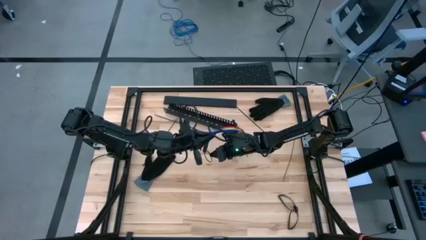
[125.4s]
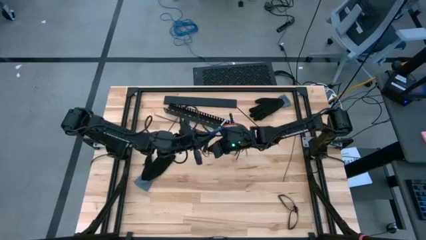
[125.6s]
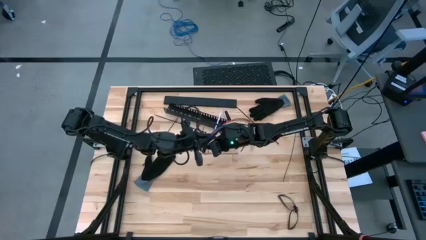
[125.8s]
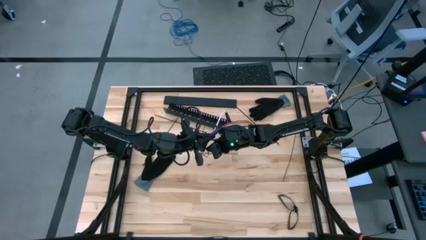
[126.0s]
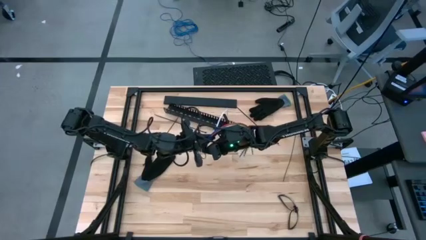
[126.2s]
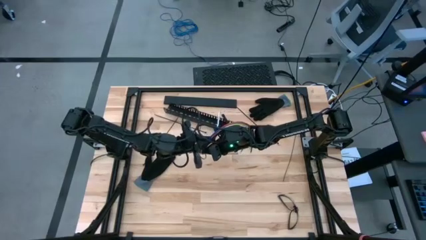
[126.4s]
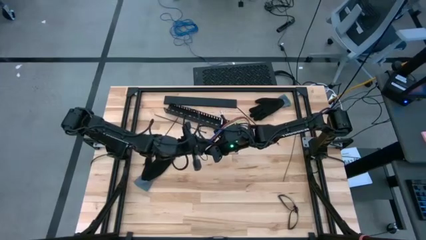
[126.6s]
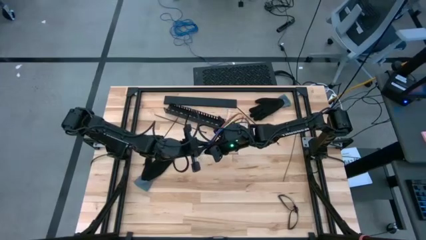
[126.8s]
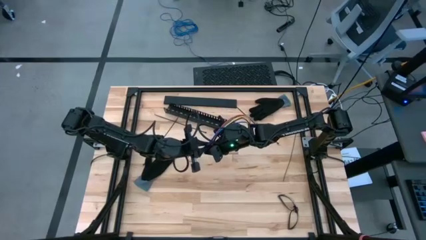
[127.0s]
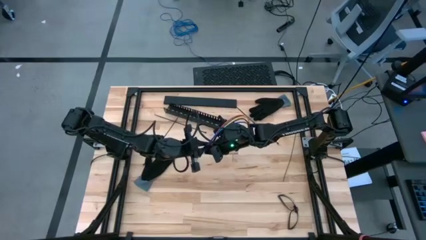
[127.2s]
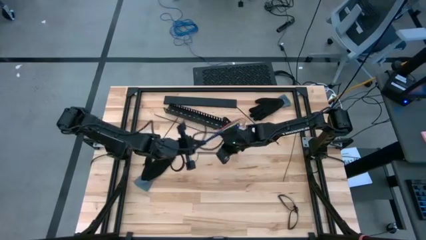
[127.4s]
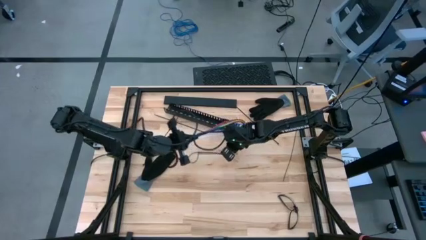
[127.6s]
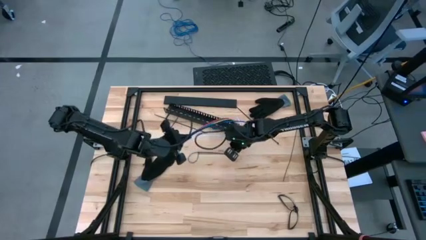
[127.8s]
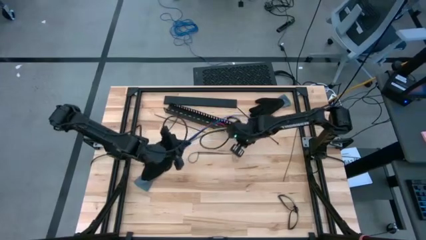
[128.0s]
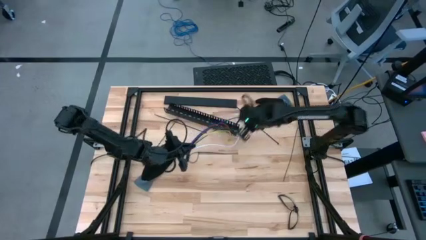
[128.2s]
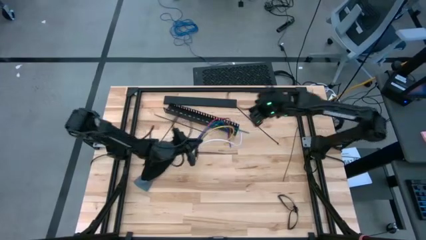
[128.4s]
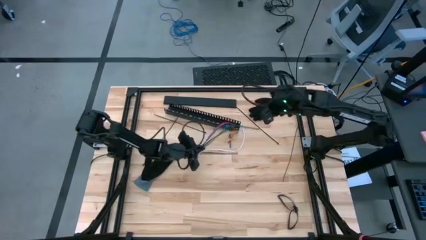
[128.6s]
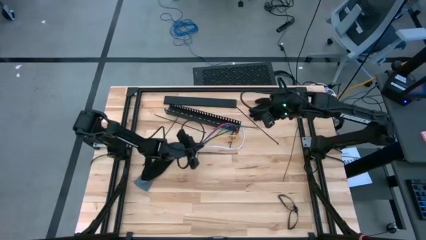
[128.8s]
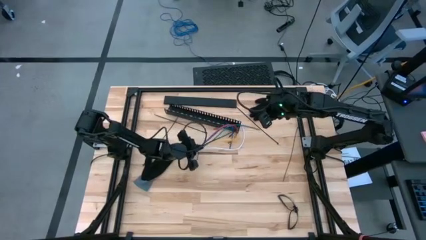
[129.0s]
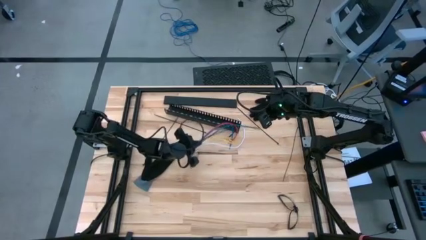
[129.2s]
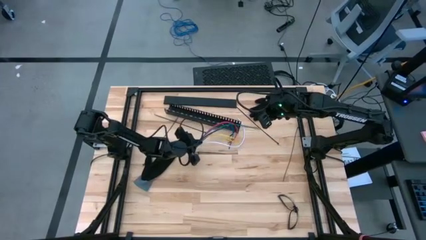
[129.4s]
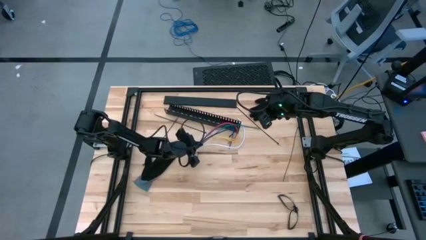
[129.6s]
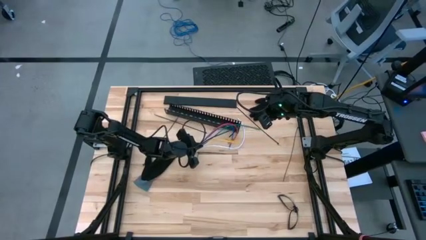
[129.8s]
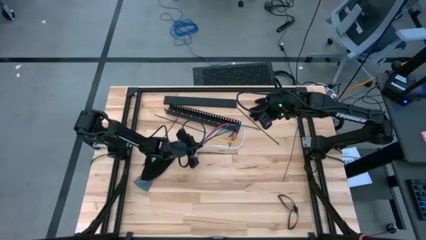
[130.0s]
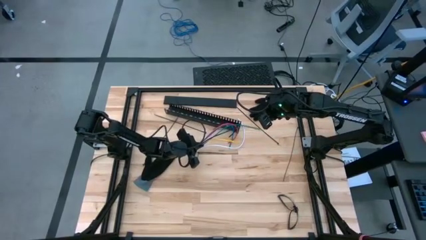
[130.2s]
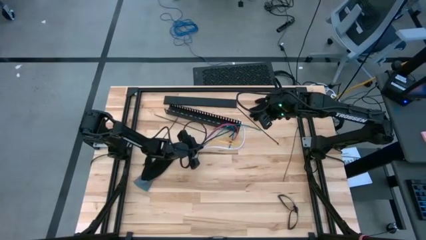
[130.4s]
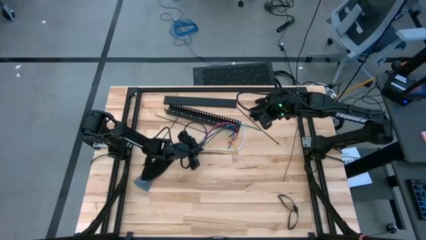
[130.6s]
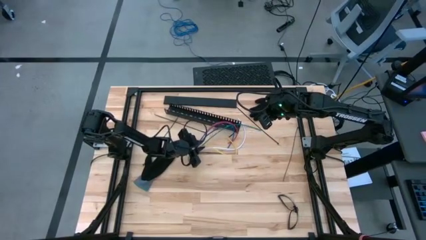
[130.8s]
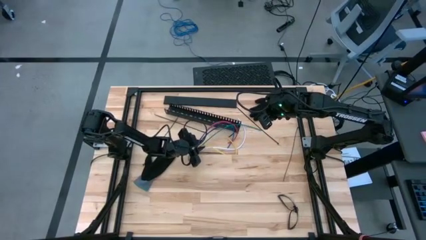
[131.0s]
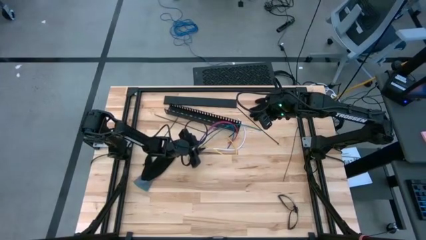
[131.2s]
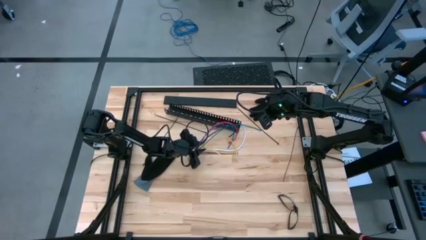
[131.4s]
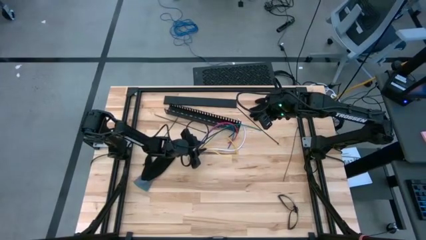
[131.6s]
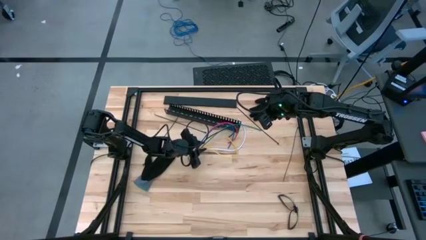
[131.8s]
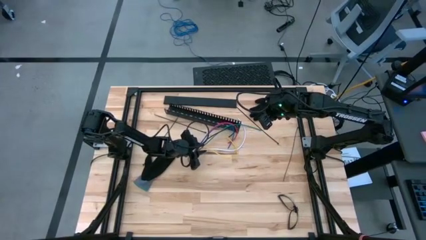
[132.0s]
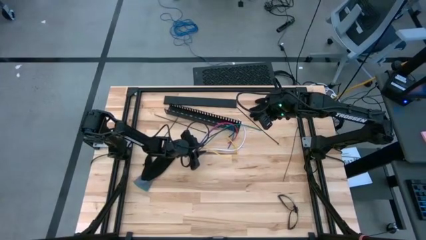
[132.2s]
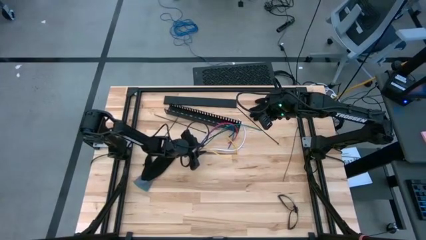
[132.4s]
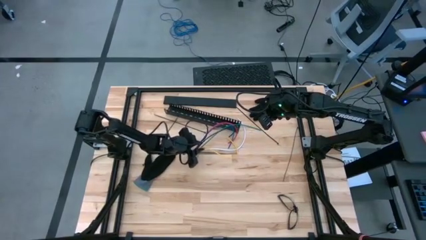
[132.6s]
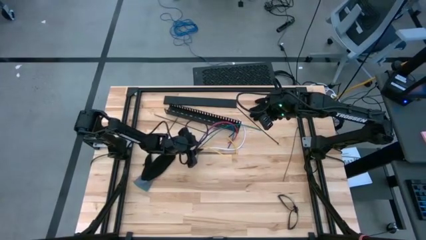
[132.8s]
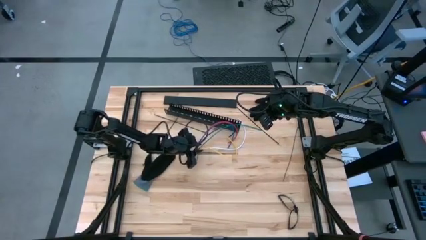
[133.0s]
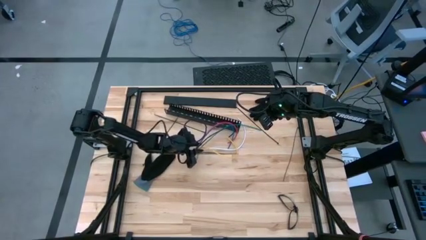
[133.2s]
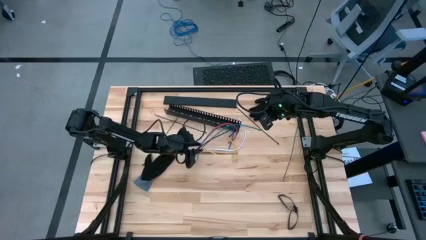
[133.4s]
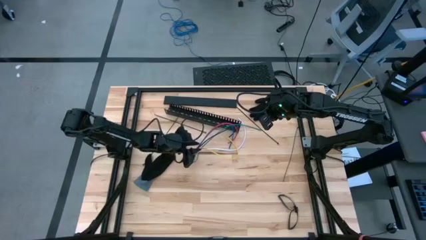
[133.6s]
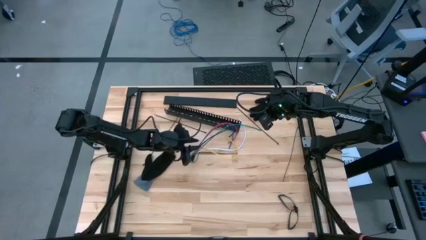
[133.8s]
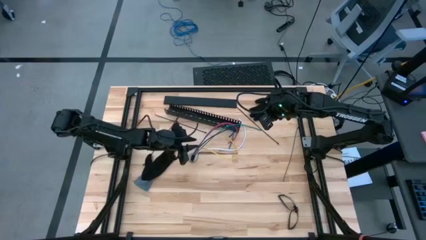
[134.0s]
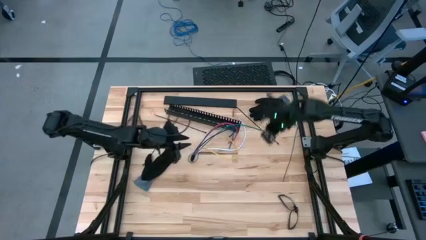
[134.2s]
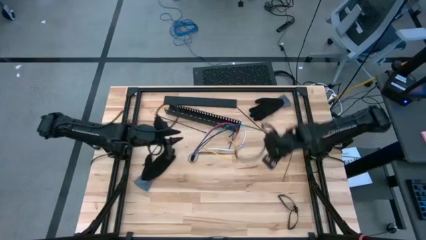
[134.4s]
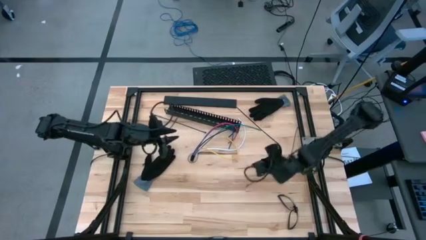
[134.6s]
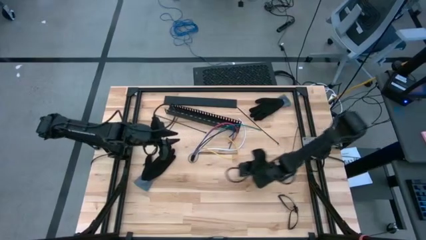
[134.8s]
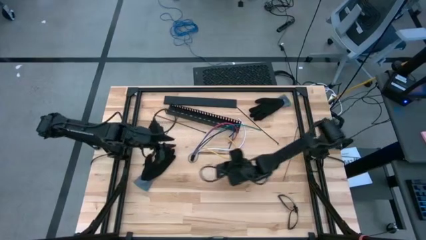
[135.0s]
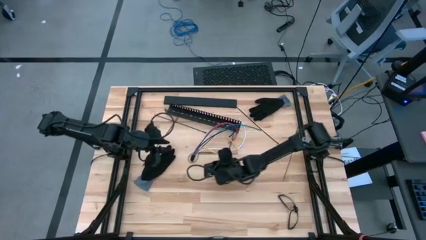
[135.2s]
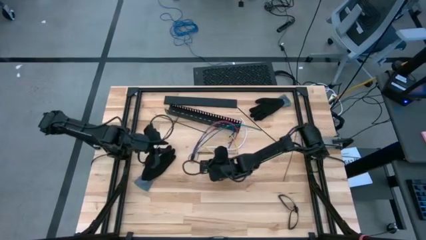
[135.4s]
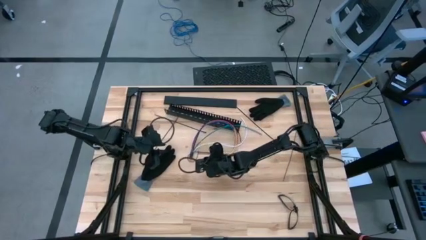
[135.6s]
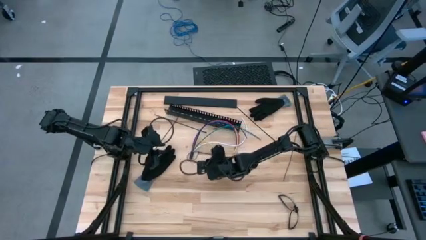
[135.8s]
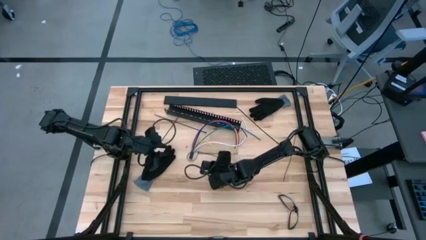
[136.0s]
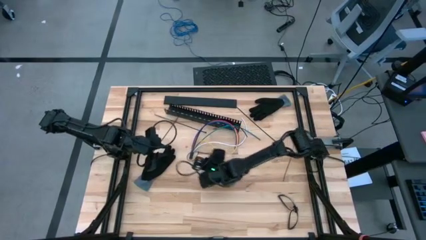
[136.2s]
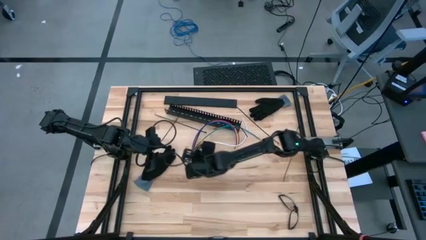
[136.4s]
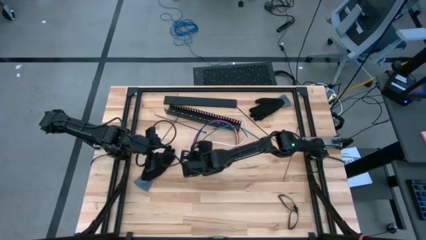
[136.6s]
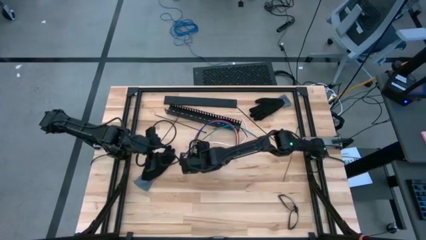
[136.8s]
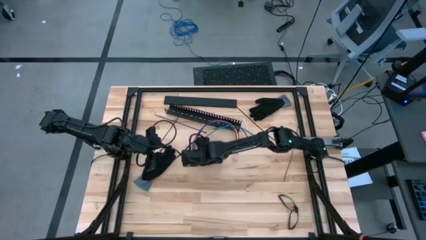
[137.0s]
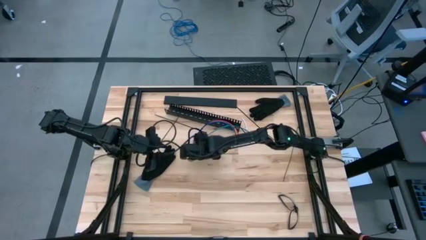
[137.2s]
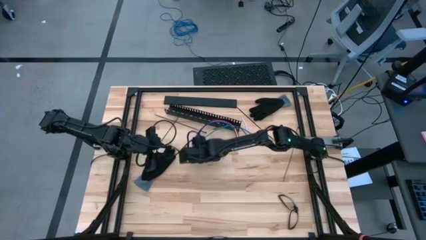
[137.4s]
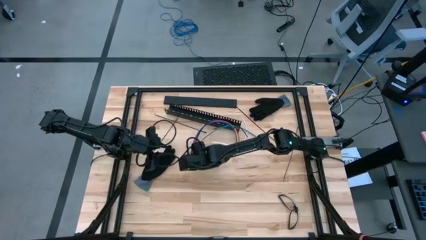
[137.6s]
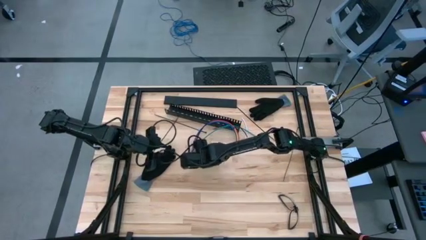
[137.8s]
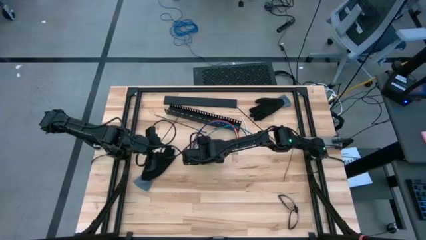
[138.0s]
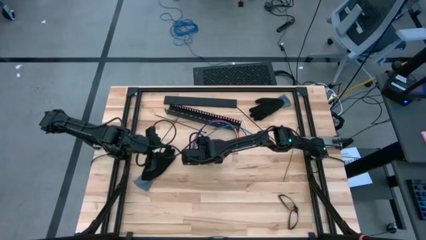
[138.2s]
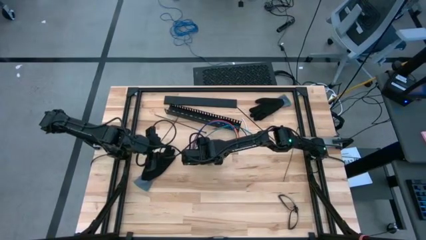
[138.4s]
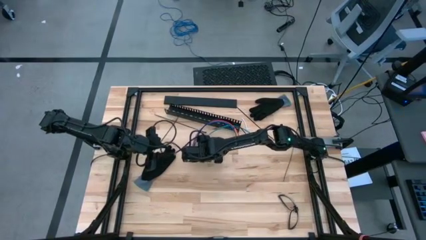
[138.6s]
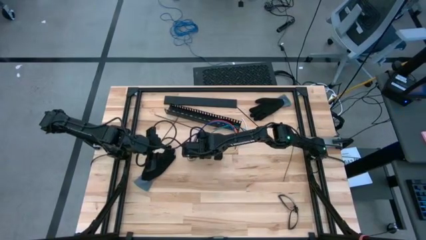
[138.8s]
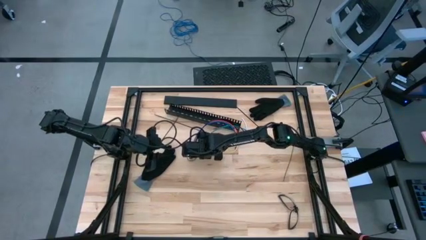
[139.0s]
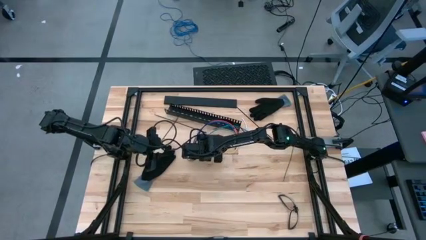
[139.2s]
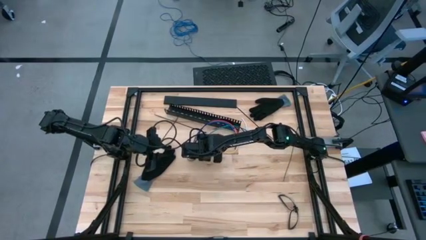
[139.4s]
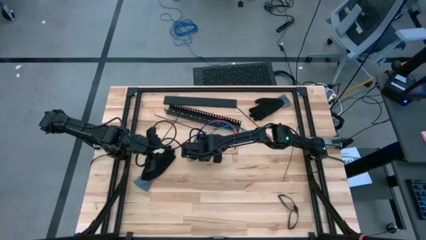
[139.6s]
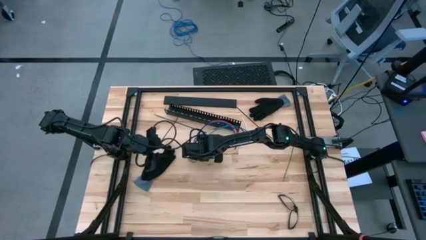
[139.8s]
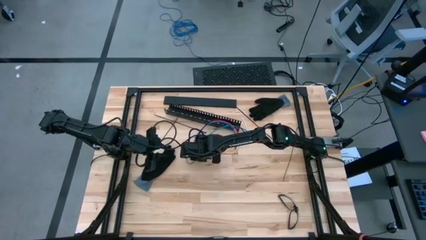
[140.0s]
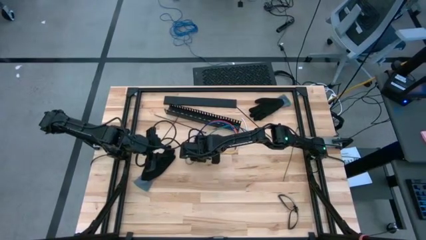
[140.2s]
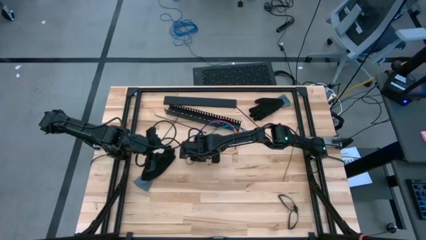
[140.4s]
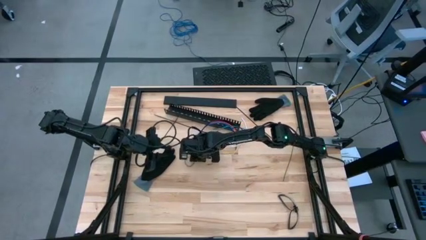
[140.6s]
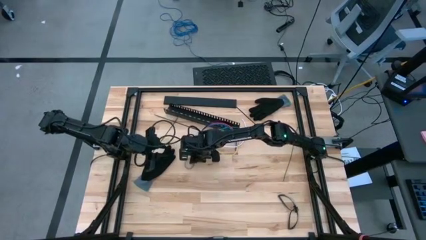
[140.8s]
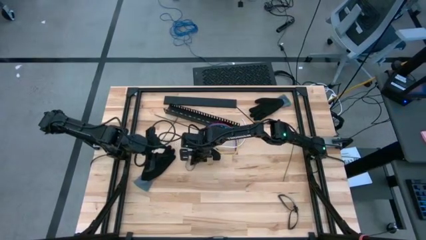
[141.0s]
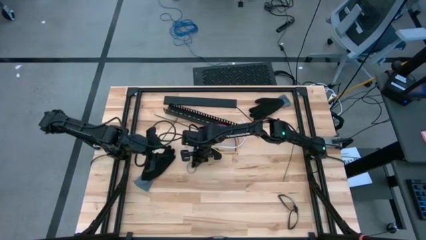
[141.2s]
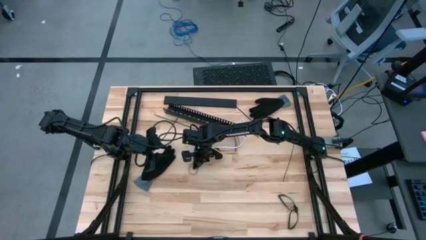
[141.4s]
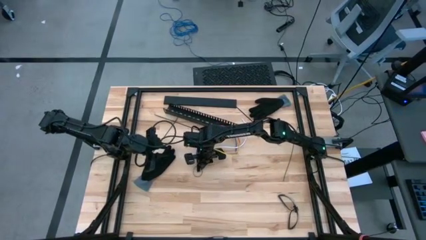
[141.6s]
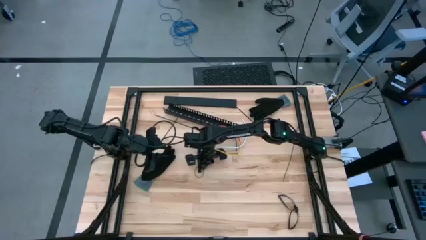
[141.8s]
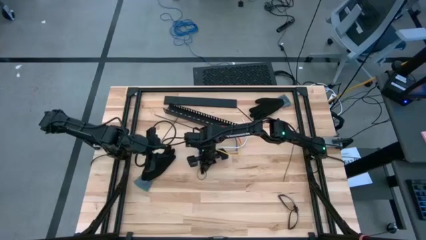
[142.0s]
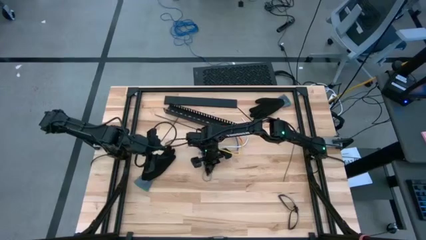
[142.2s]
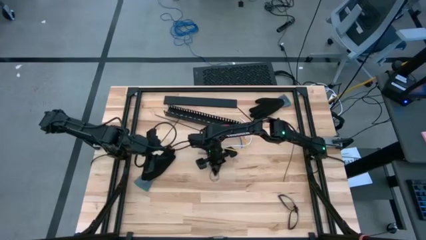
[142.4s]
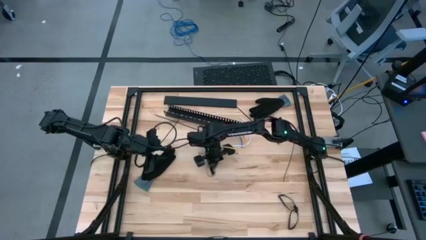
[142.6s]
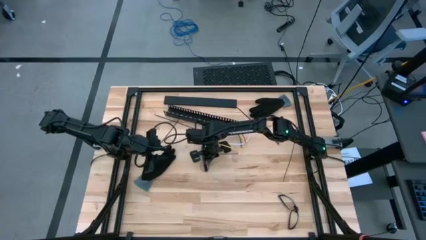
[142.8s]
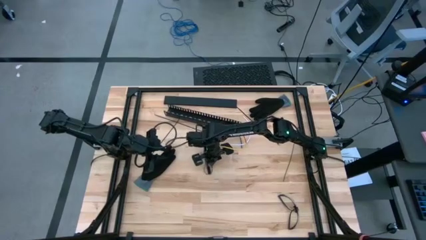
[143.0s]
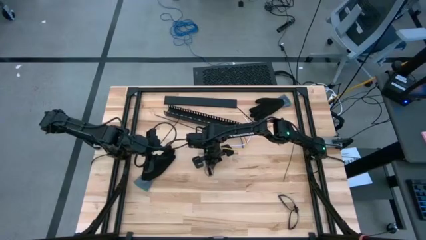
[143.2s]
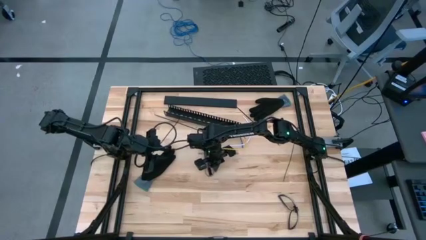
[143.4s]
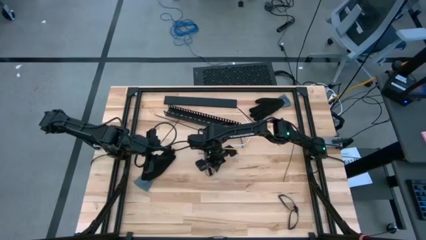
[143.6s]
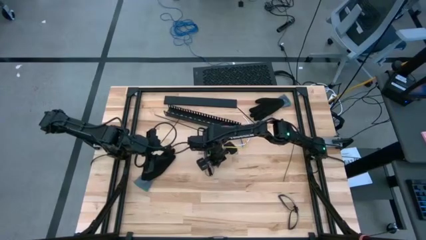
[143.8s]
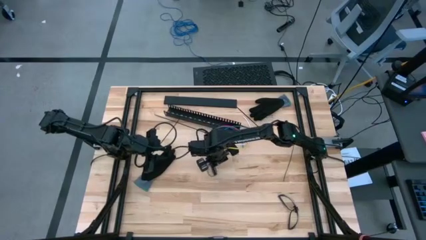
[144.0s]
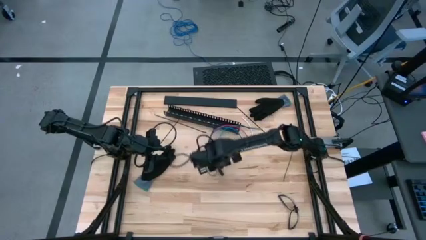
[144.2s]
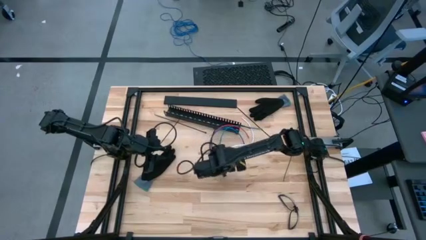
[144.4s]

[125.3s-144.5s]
Task: Ziptie cables
Wrap the cable wires using a zip tie
